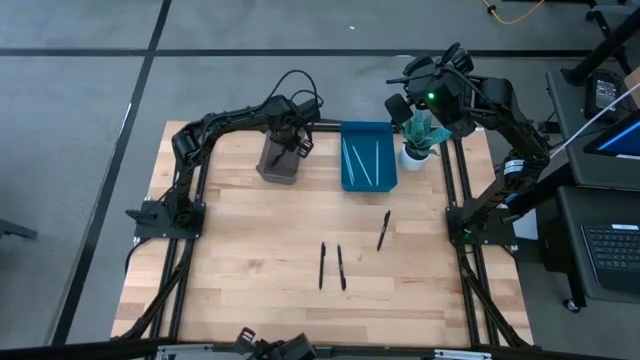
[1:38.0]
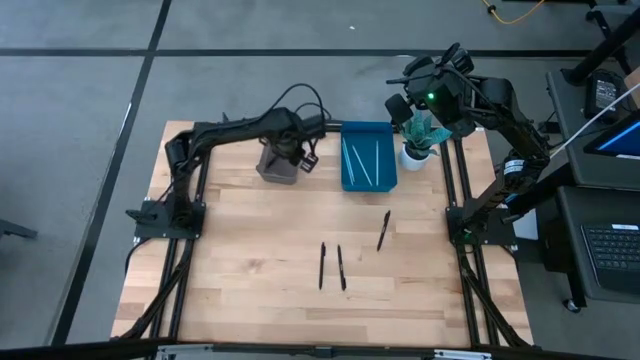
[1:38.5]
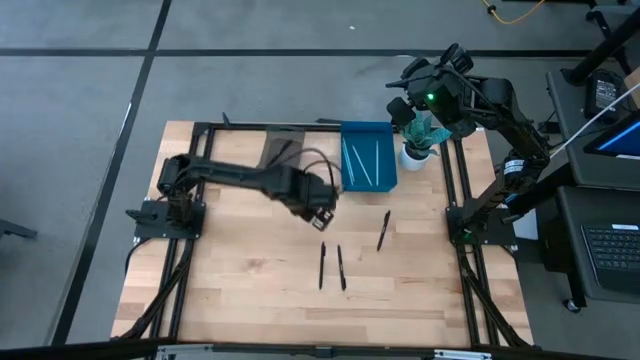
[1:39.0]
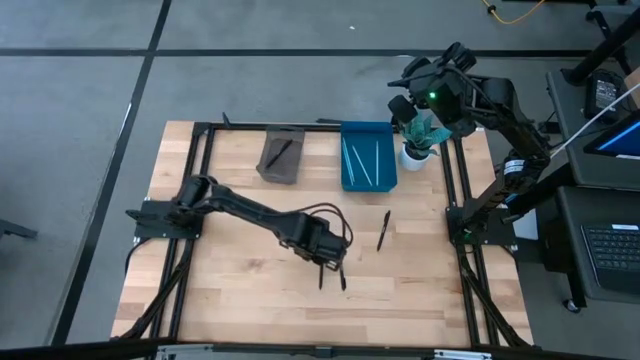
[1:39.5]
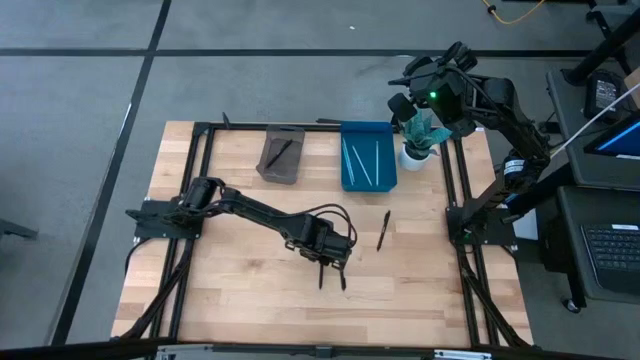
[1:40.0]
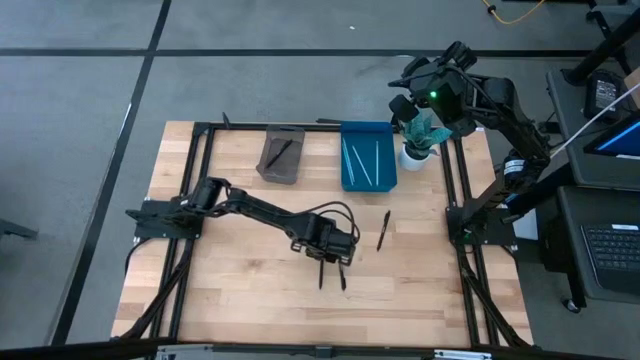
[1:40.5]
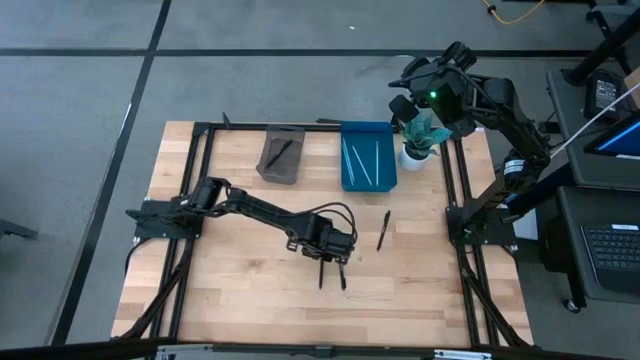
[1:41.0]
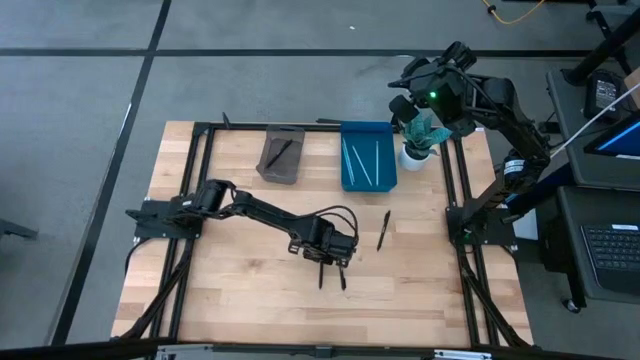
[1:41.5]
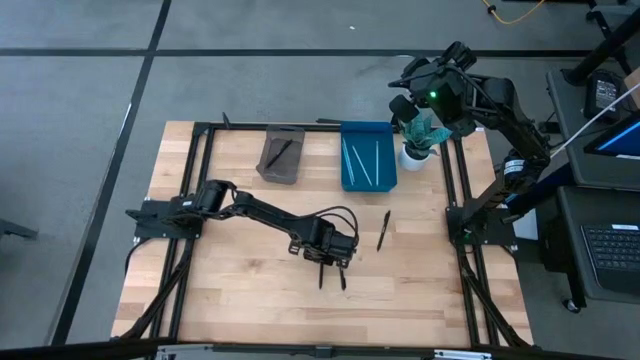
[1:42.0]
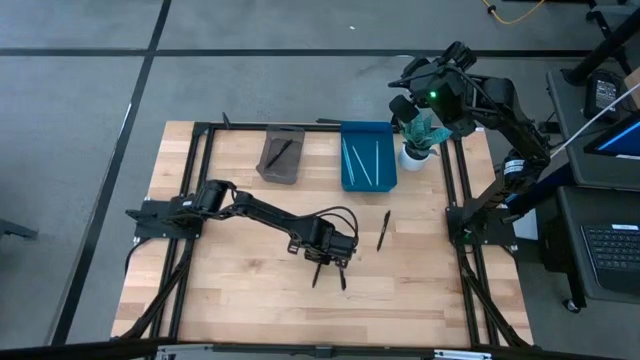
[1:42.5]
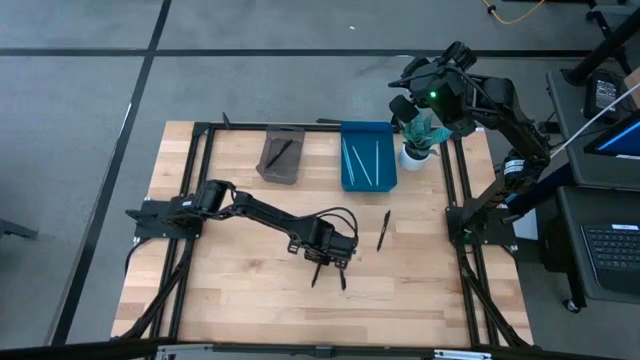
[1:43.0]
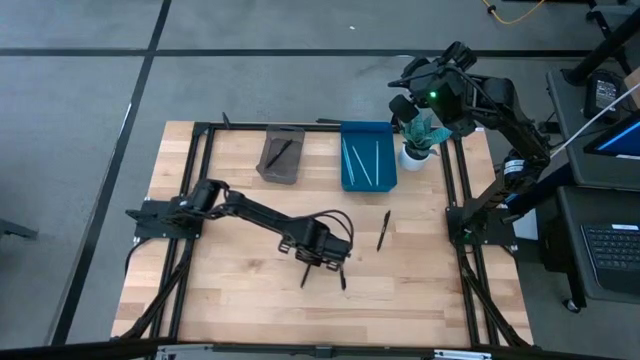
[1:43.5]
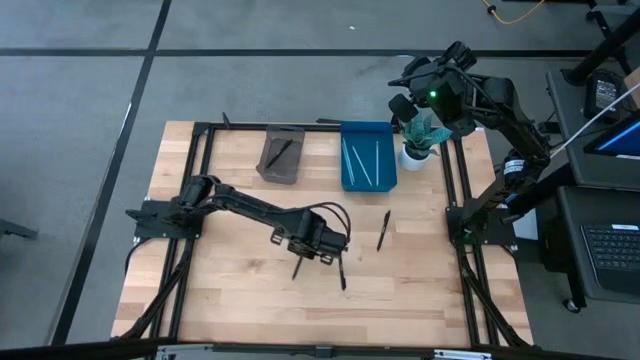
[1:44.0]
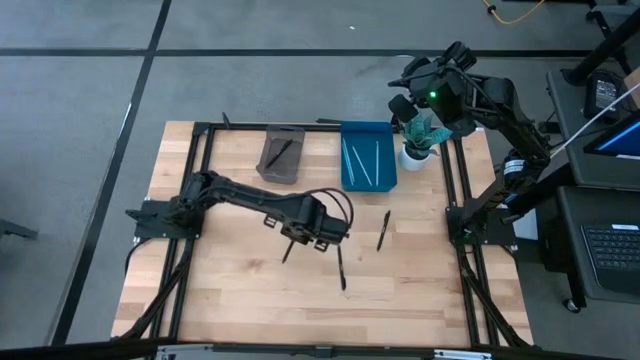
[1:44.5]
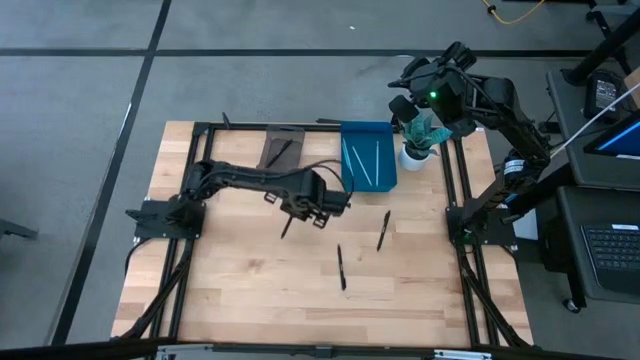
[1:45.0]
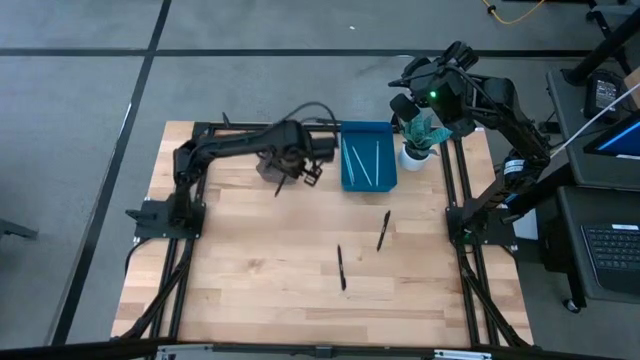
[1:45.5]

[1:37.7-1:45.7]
Task: Sort pens & pencils
Put the left black pen into the gray bin

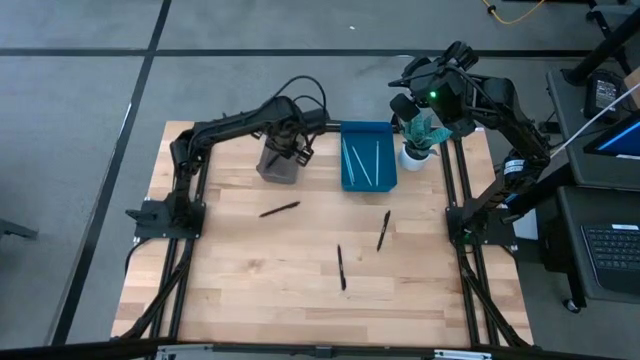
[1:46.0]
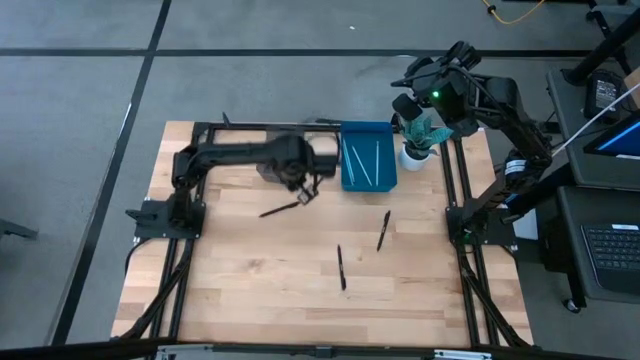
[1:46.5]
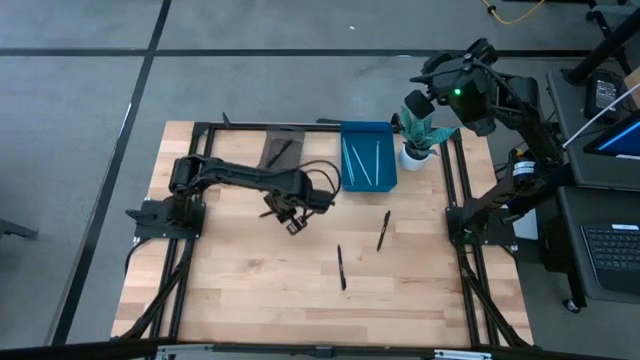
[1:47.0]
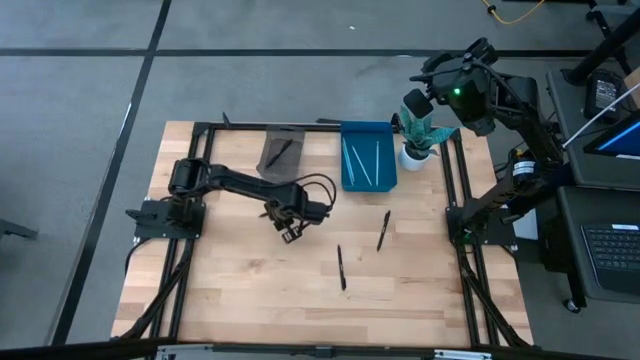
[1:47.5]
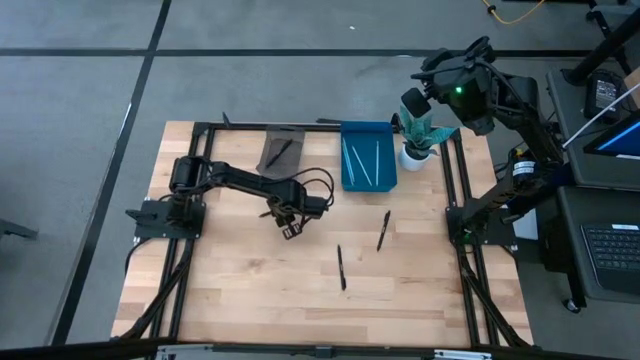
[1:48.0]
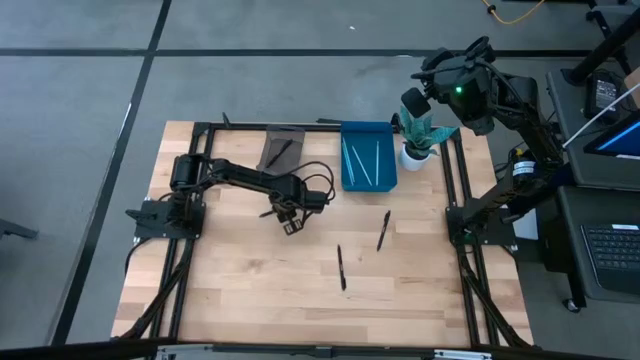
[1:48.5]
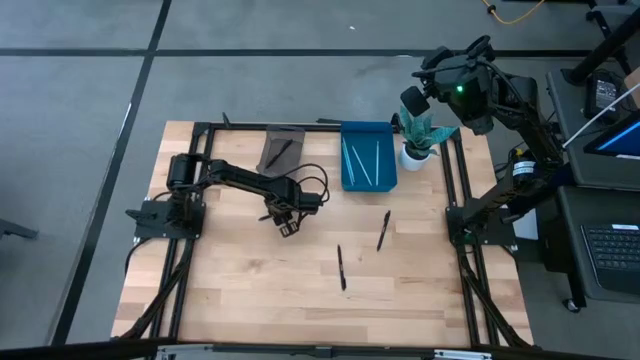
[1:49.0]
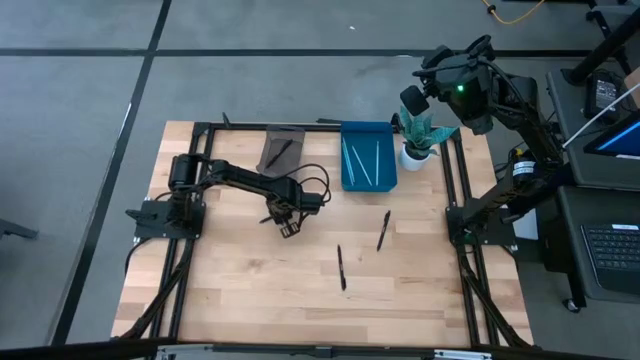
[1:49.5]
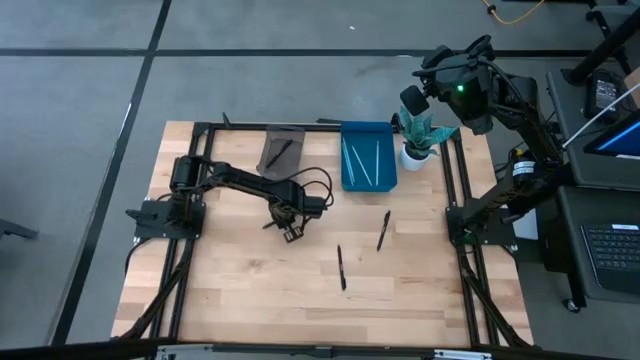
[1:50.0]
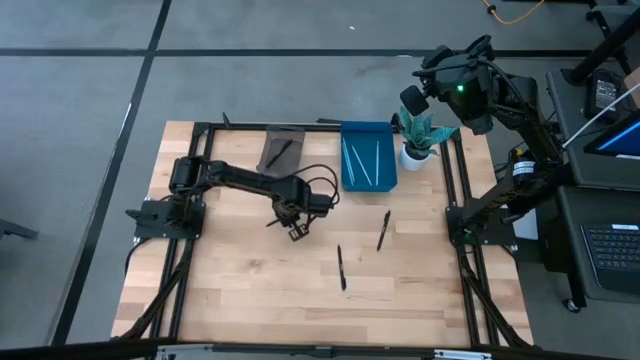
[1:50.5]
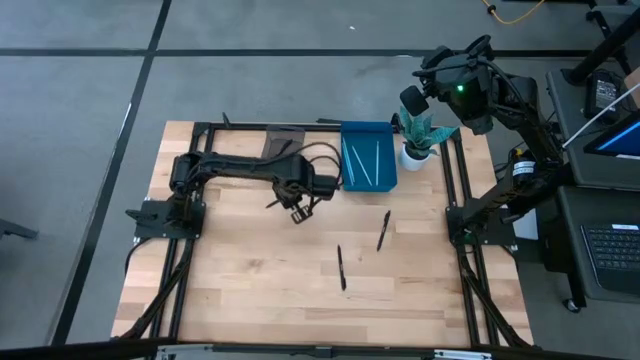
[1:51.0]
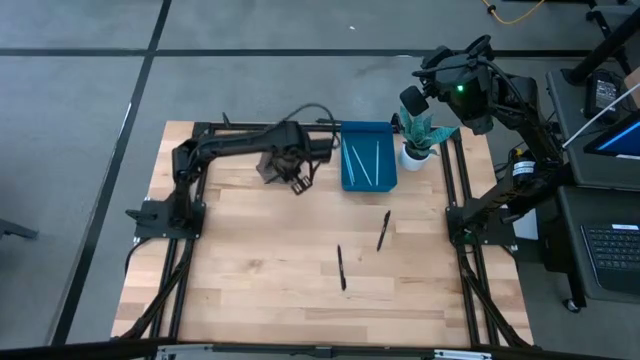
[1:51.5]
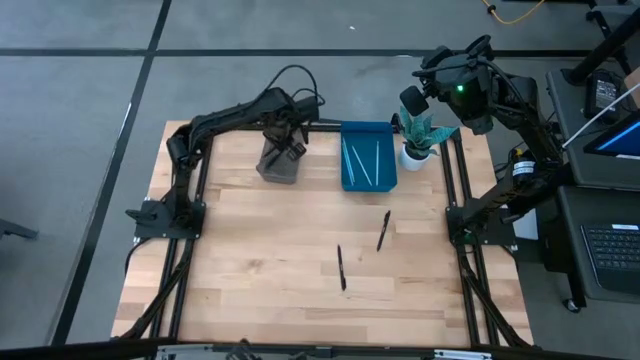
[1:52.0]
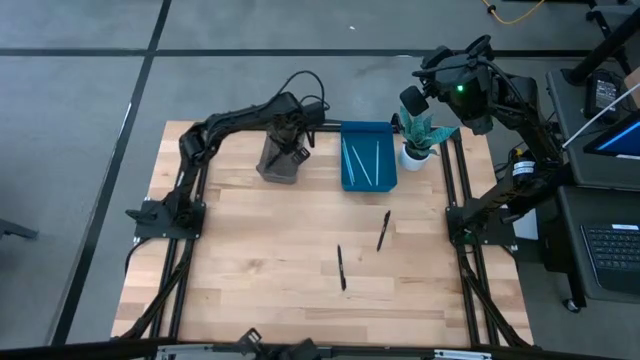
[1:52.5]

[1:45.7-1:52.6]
Put the top left black pen into the gray bin

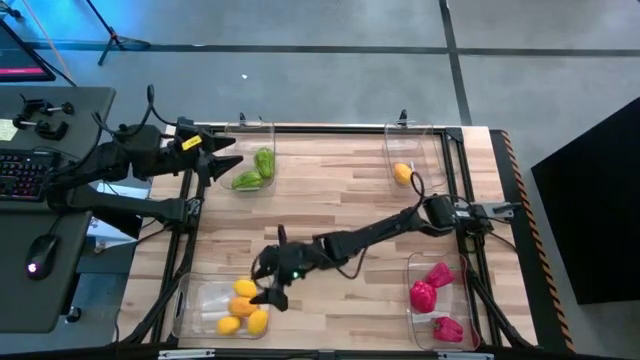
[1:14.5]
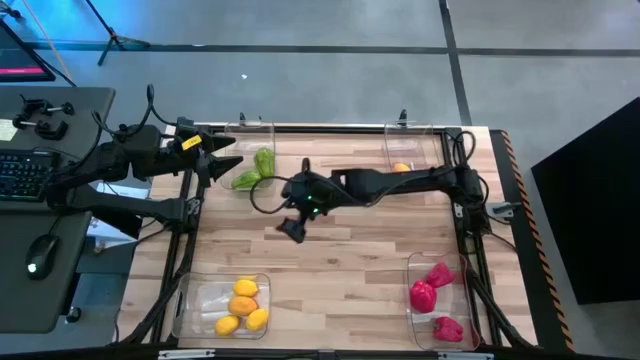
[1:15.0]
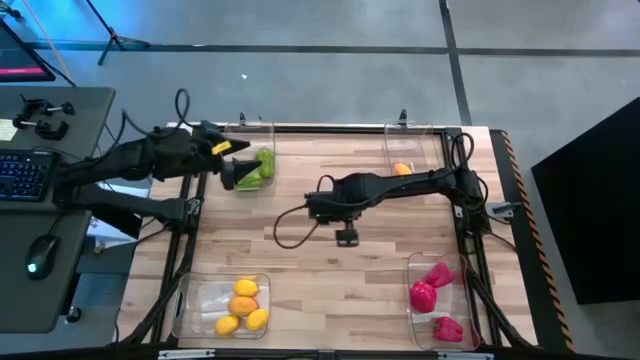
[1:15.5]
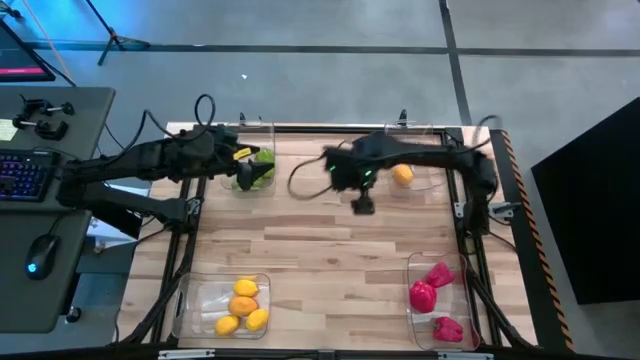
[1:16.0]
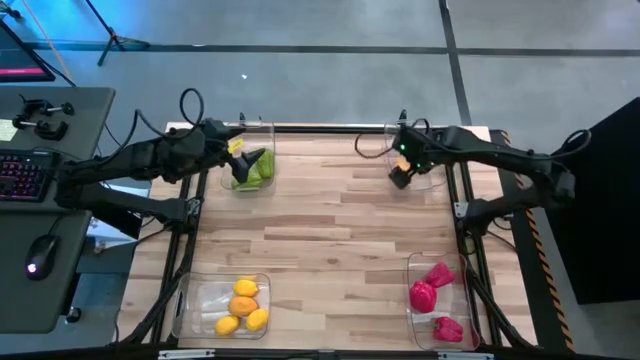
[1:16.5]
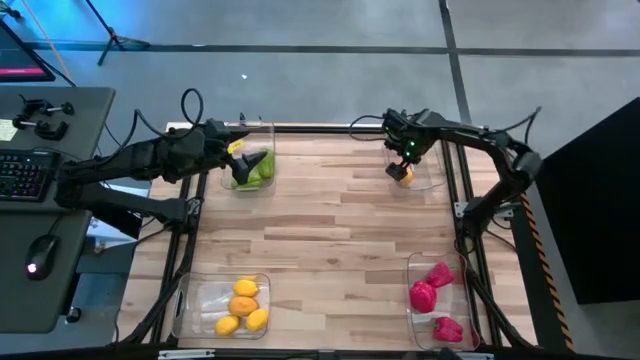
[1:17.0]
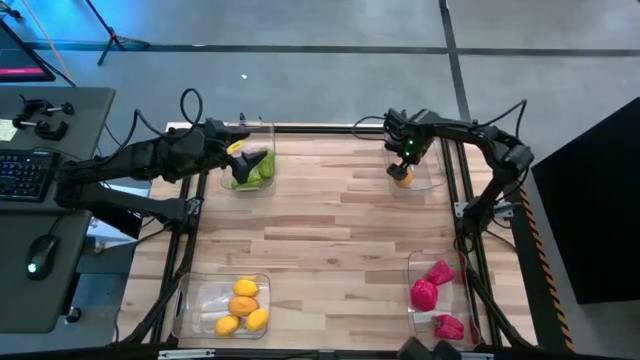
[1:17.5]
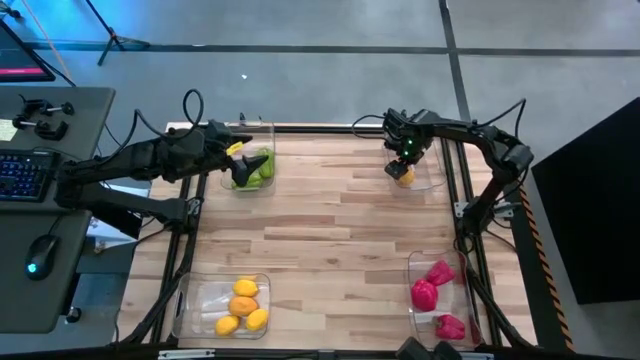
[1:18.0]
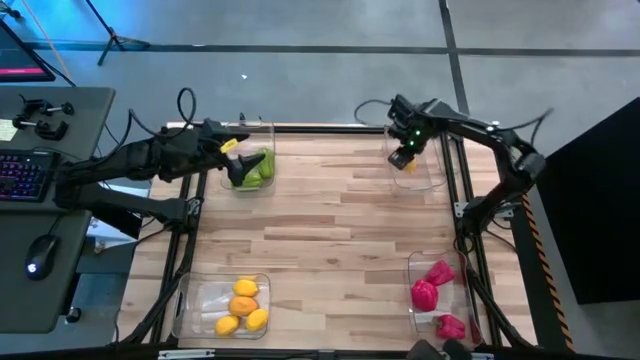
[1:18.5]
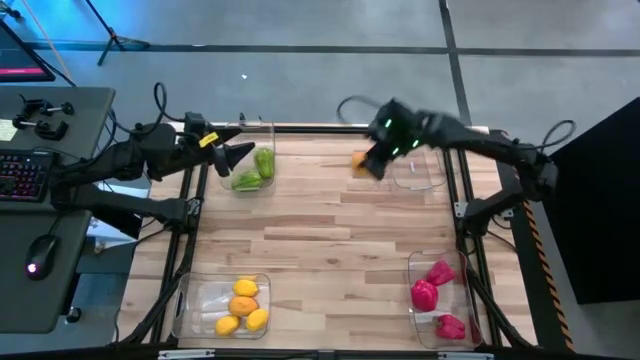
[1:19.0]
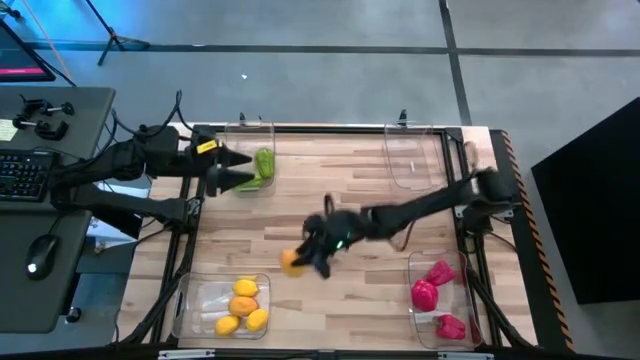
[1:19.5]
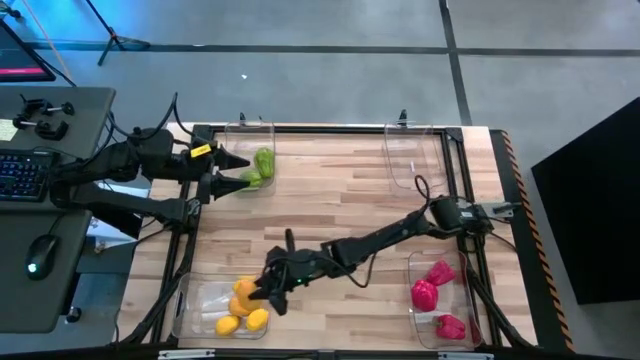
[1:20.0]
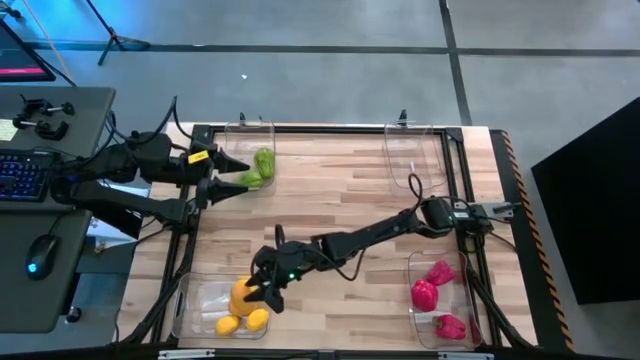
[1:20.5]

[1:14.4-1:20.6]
Task: Sort produce into baskets
Put the lemon into the bottom left transparent bin
